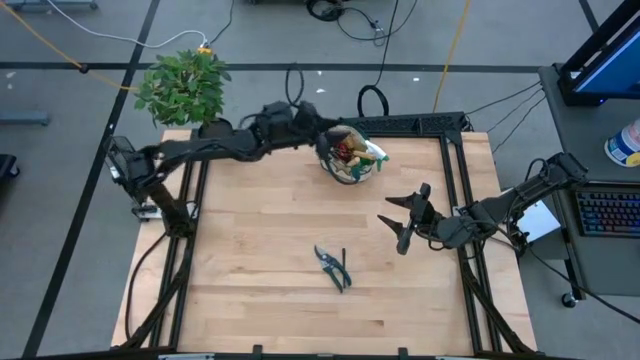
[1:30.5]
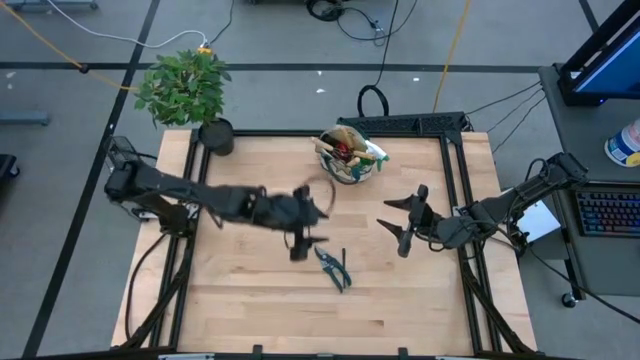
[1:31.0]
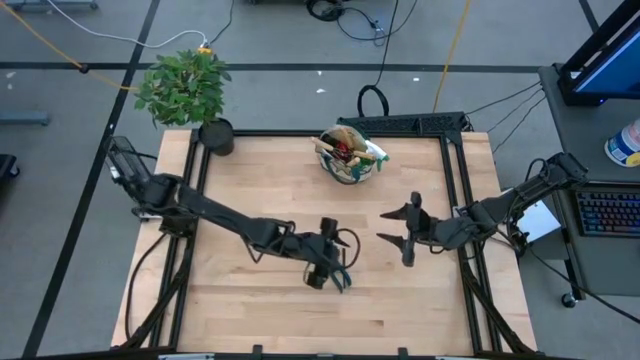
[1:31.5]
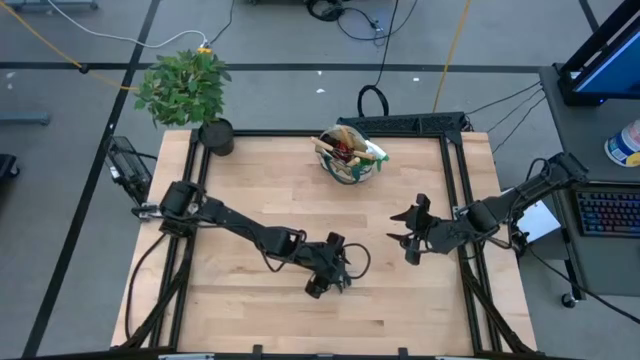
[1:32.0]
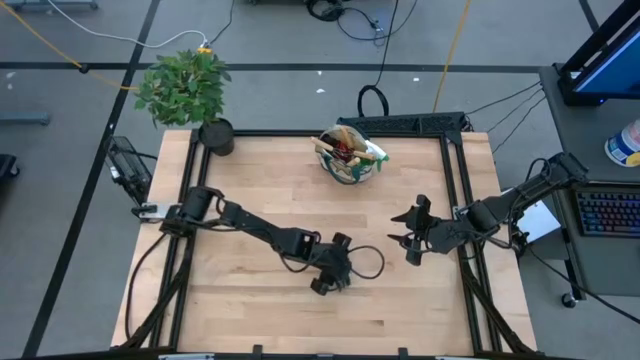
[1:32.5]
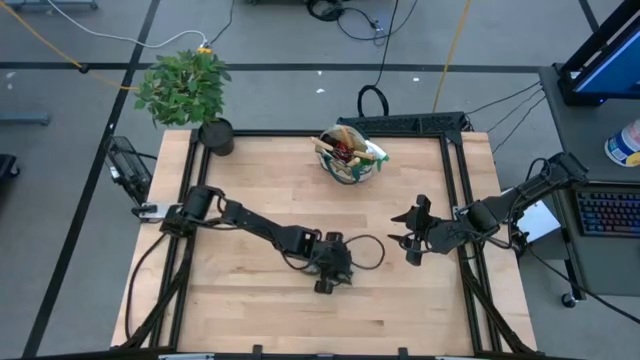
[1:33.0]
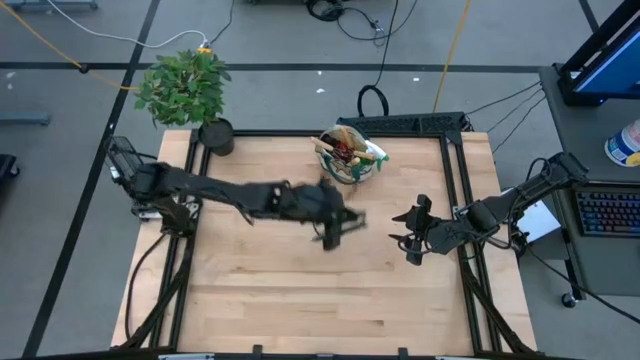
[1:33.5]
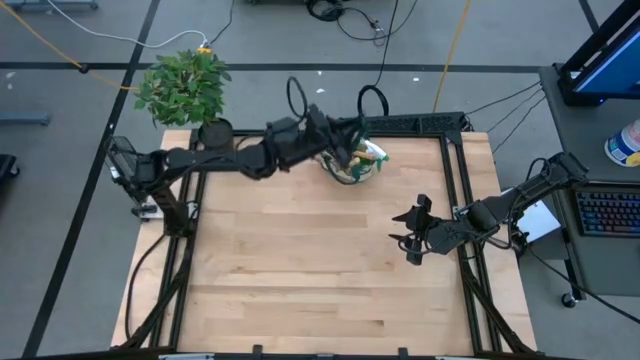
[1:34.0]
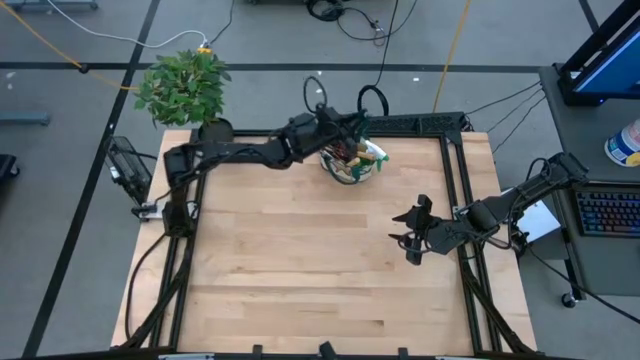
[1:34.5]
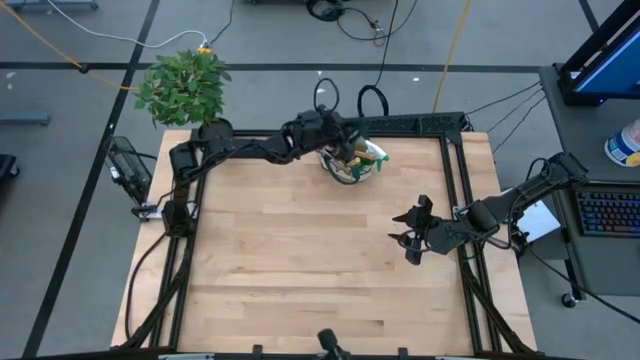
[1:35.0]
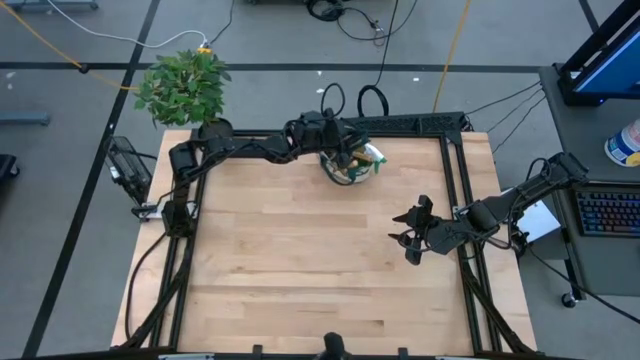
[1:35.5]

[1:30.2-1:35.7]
Task: Pick & Place Garden tools in Gardening bag
Put the shear scissors into the gardening bag

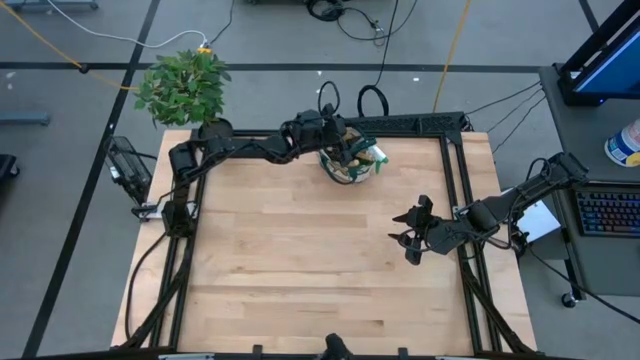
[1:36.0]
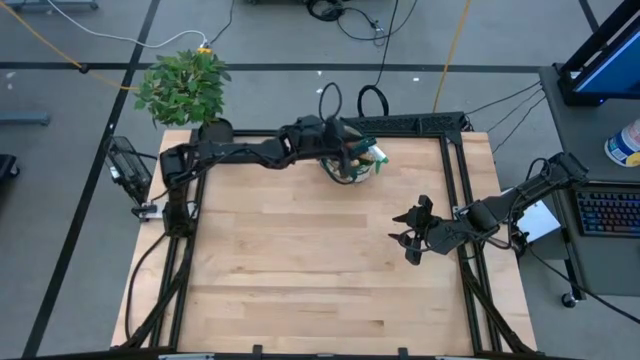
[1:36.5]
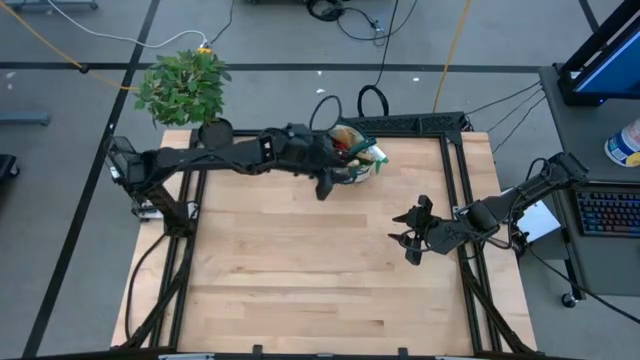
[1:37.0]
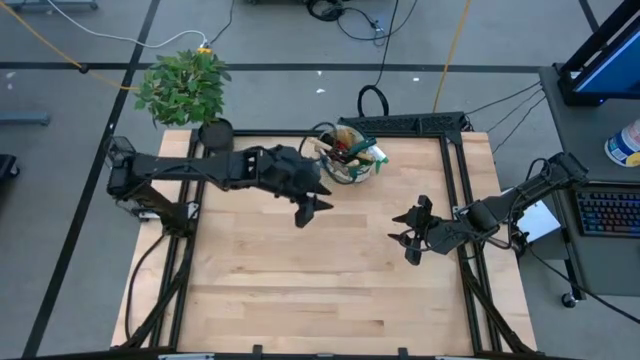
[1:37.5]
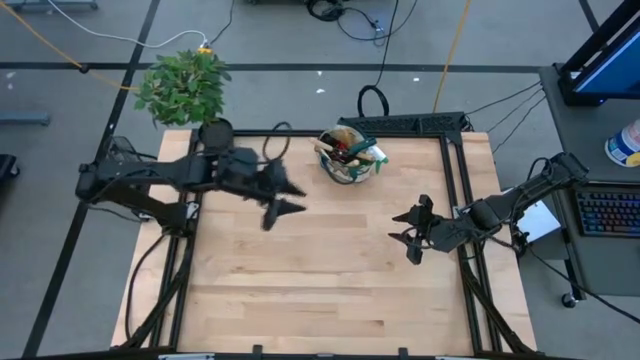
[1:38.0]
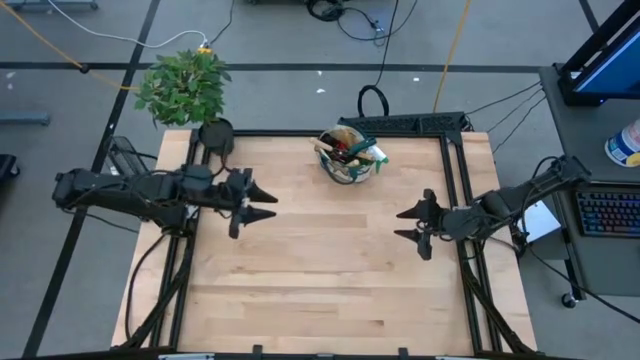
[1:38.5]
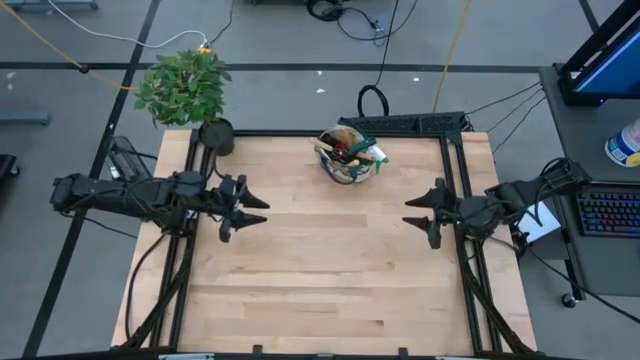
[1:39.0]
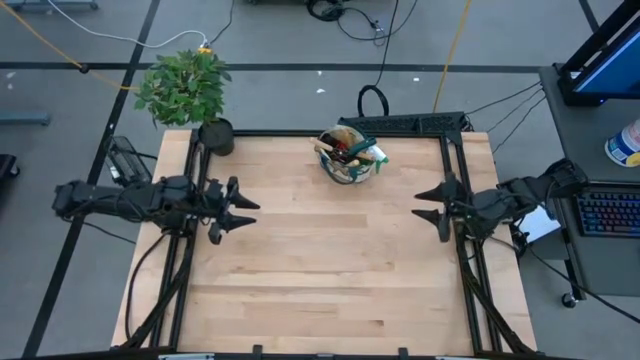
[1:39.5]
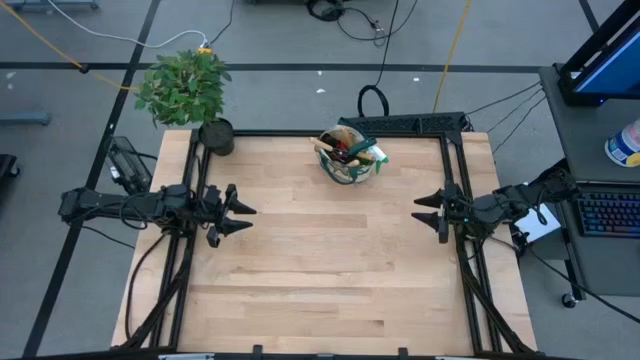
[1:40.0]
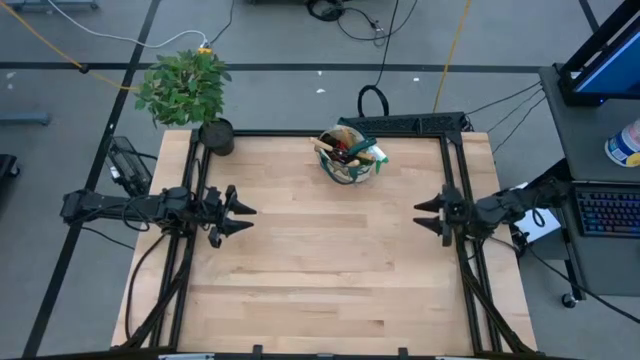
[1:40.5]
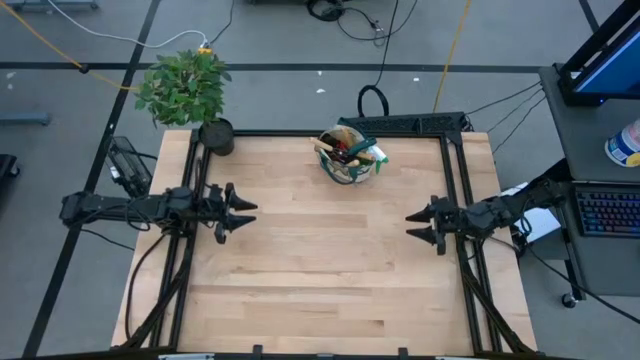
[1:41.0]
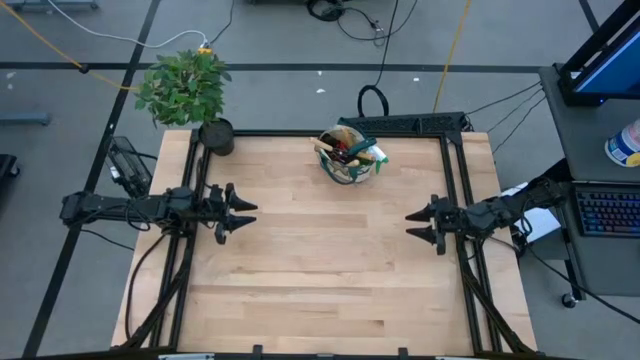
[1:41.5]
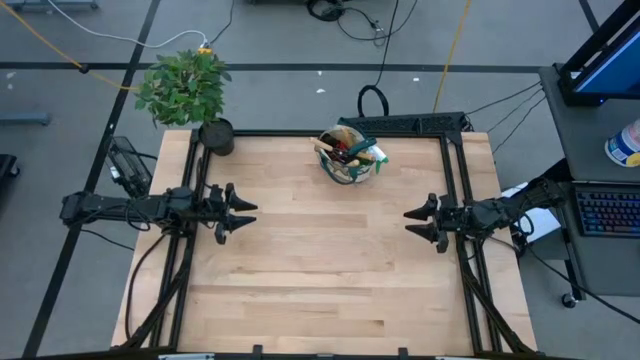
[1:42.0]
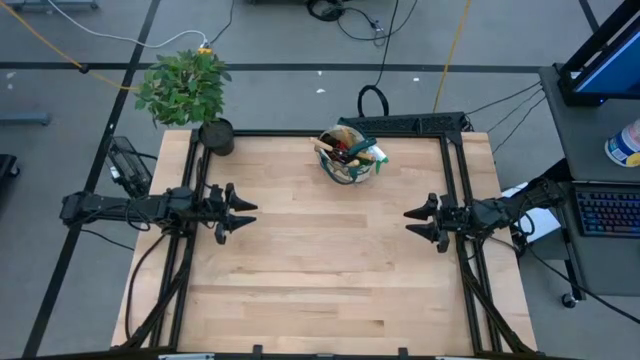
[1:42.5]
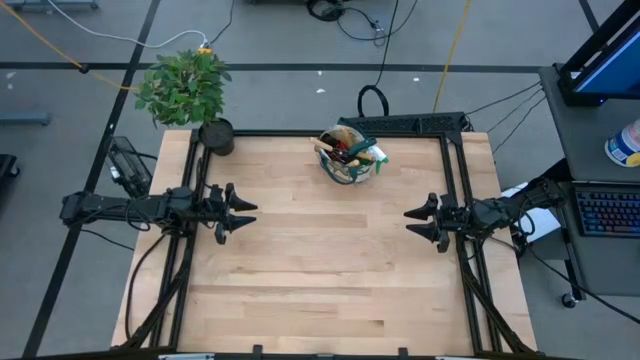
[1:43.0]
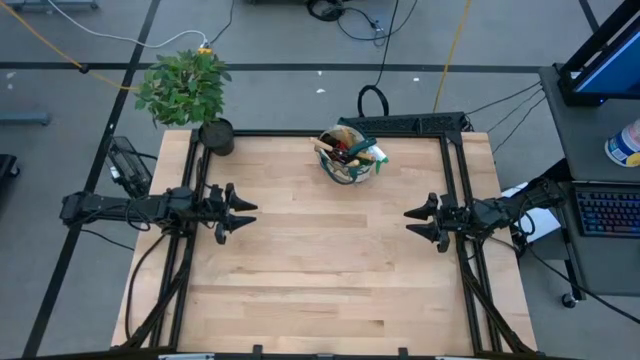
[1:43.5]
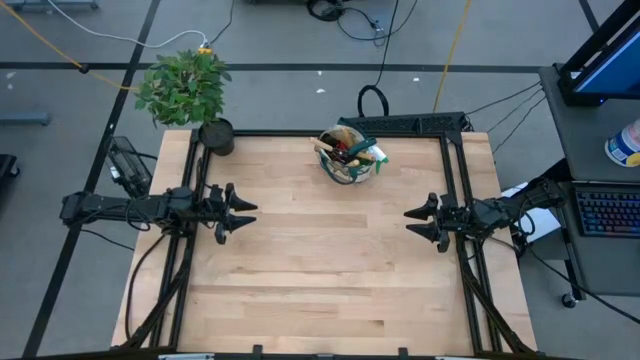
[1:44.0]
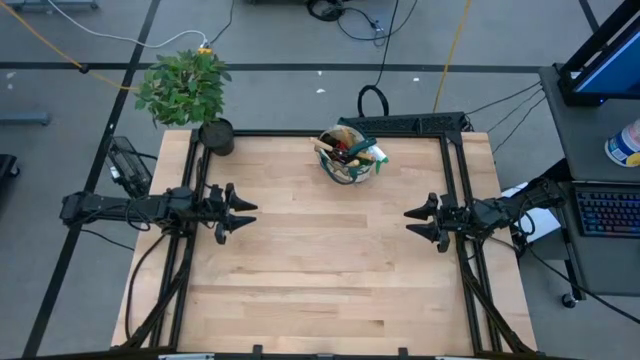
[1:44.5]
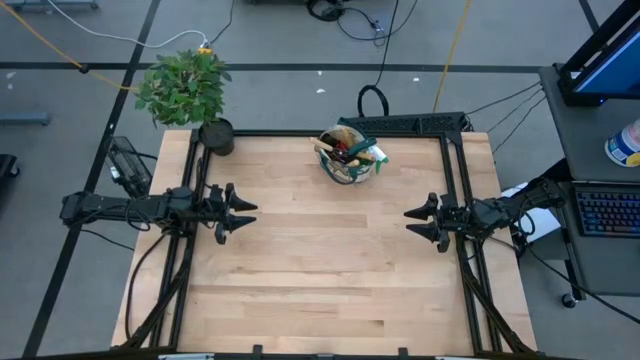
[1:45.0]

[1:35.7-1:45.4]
Return to Home Position

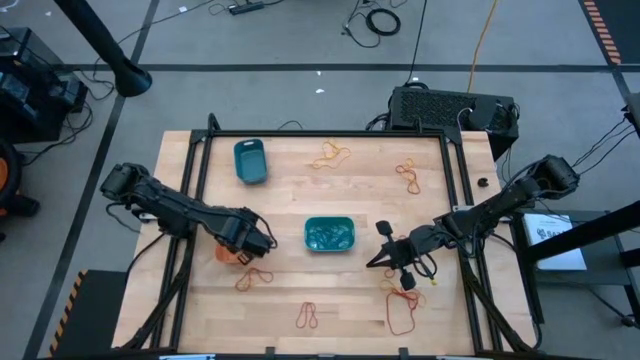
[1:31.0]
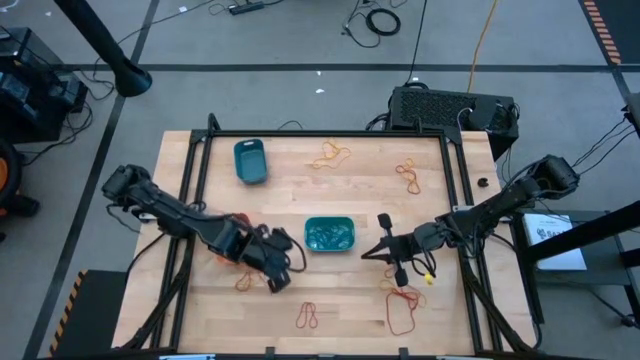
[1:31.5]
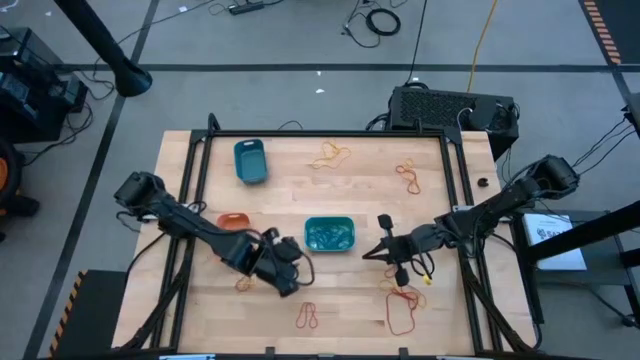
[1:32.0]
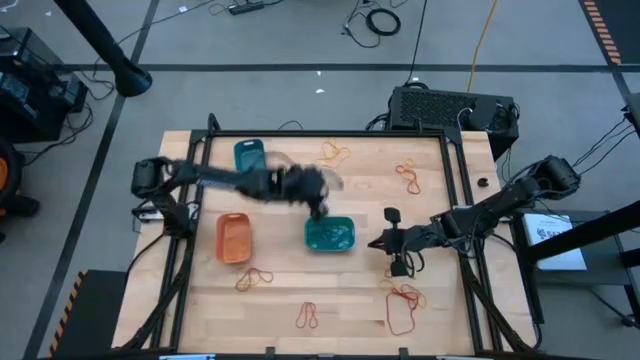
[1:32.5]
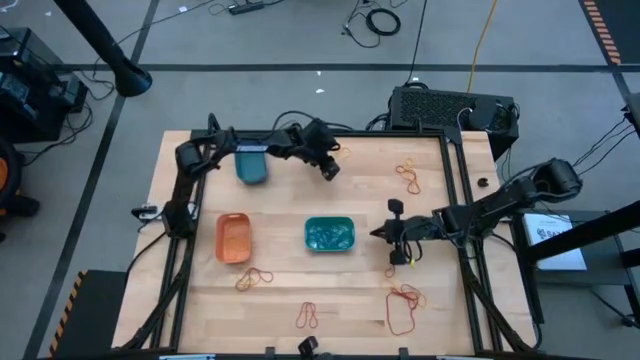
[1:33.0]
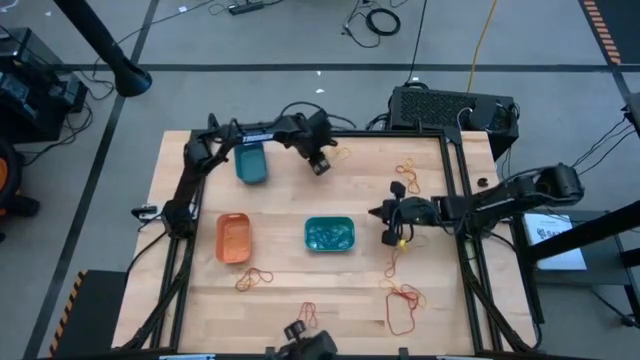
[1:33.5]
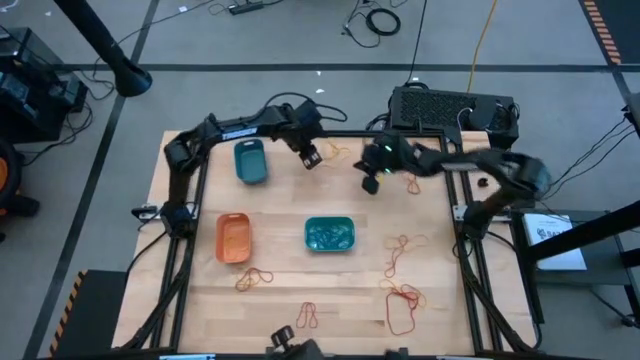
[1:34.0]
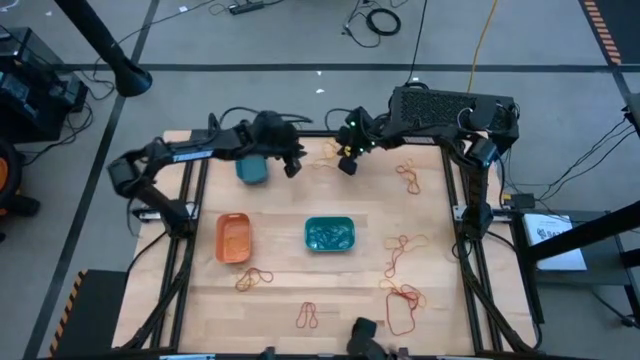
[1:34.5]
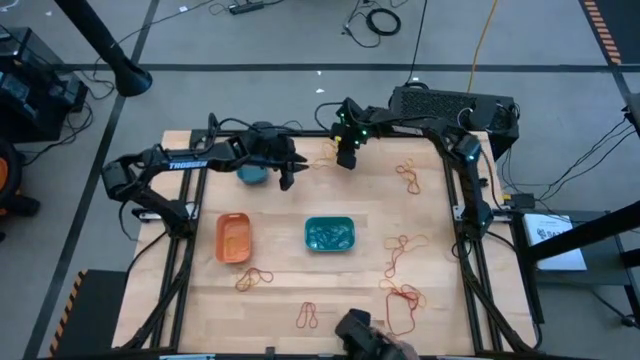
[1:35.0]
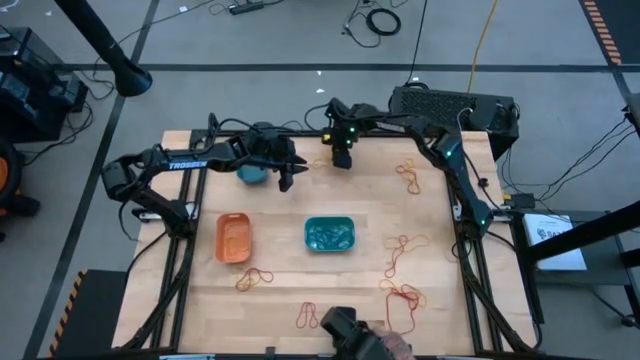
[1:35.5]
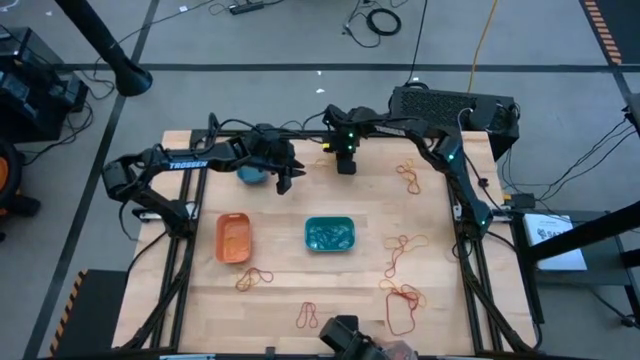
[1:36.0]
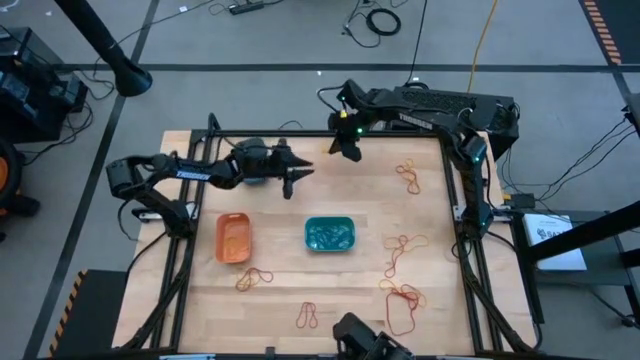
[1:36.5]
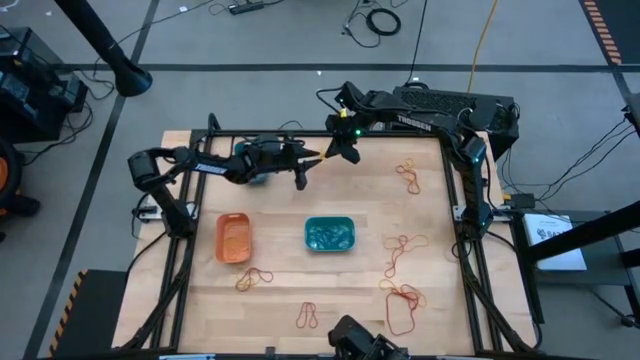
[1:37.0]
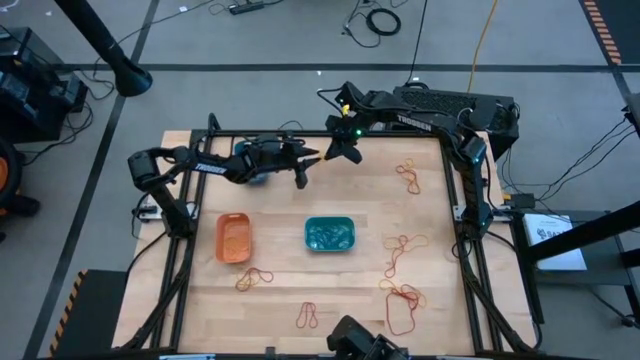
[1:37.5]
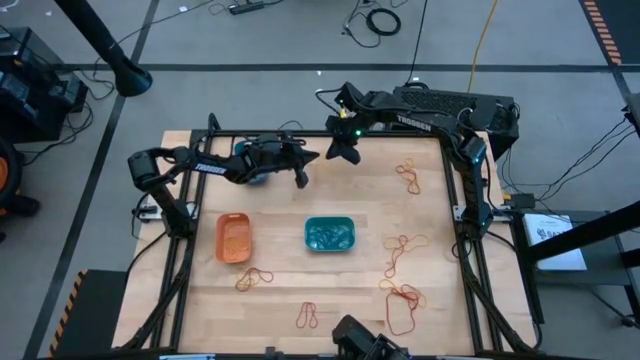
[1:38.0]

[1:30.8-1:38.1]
Task: Sort rubber bands into baskets
Put the yellow rubber band into the orange bin
